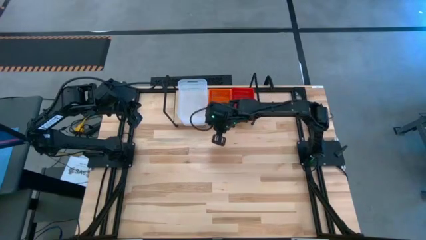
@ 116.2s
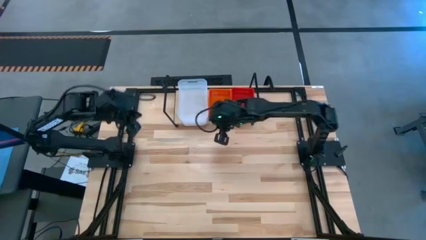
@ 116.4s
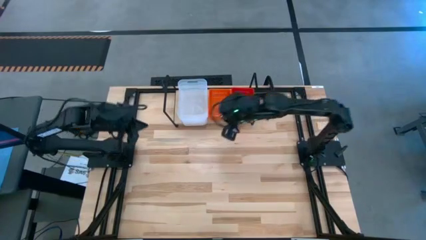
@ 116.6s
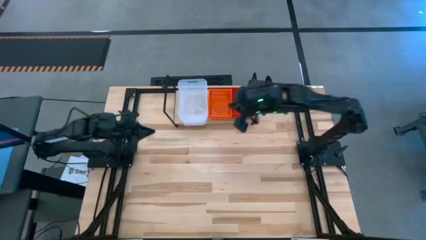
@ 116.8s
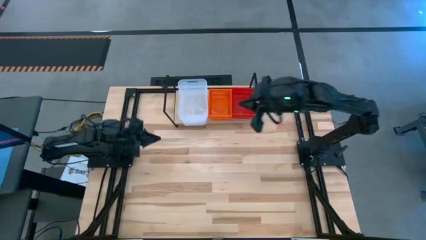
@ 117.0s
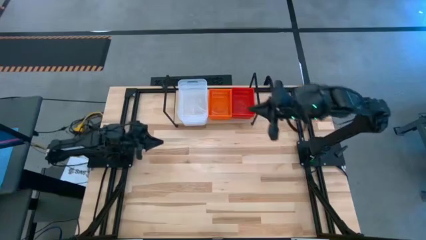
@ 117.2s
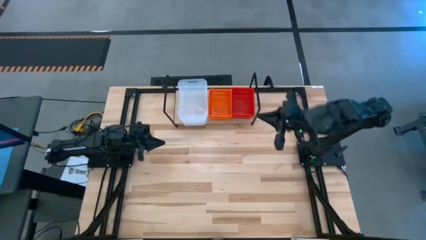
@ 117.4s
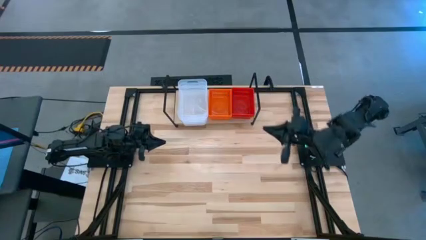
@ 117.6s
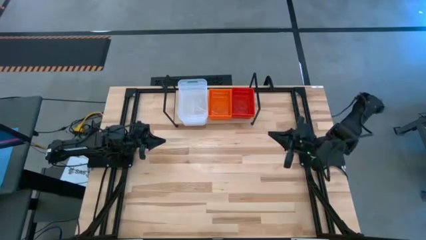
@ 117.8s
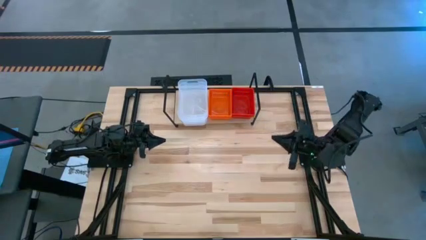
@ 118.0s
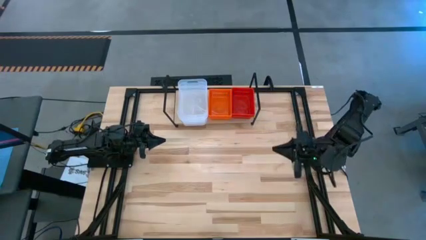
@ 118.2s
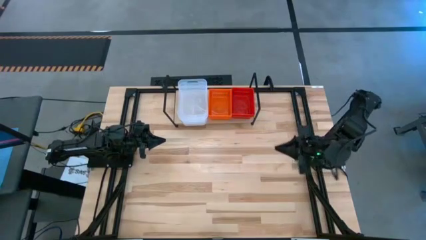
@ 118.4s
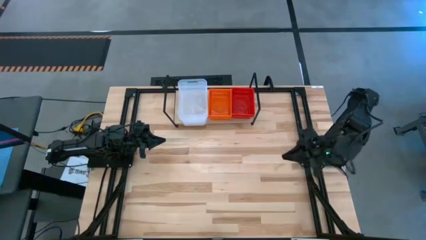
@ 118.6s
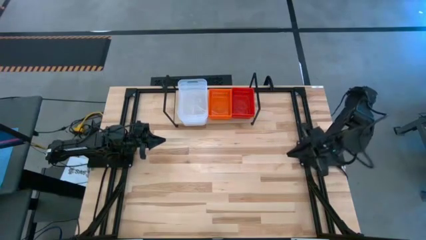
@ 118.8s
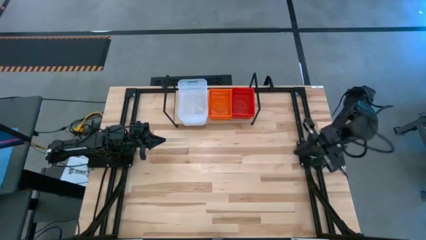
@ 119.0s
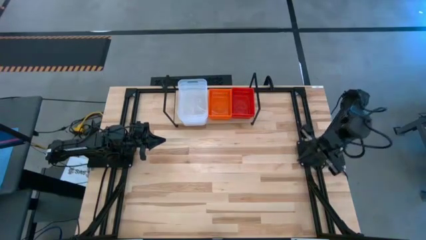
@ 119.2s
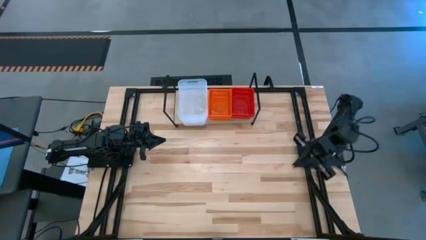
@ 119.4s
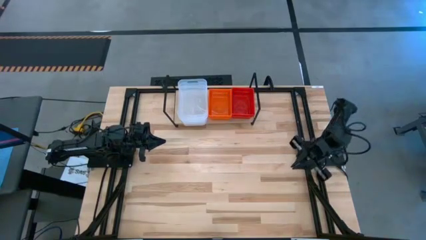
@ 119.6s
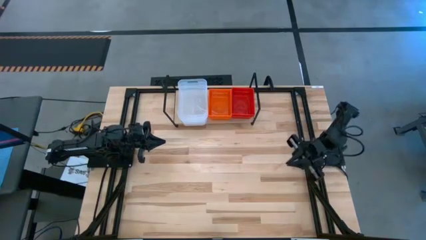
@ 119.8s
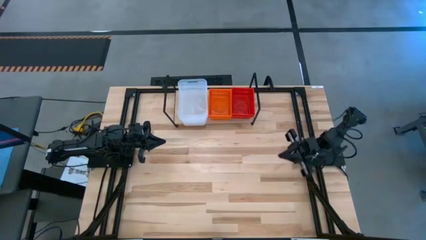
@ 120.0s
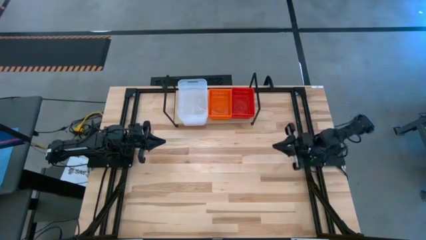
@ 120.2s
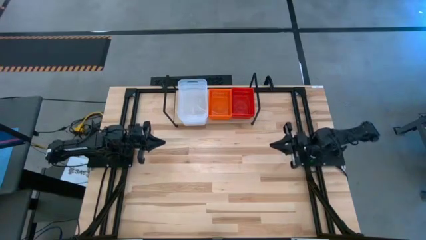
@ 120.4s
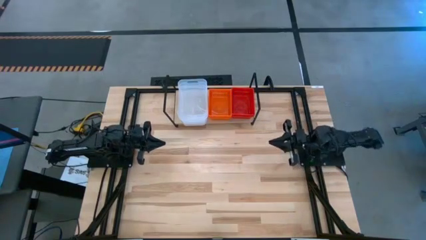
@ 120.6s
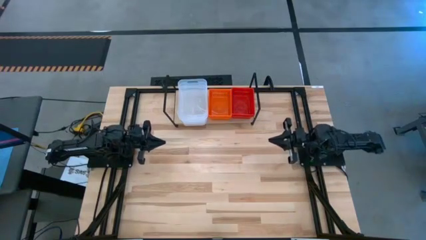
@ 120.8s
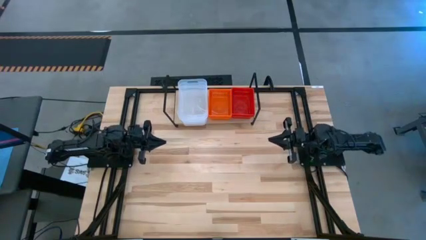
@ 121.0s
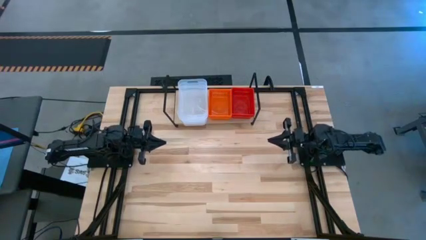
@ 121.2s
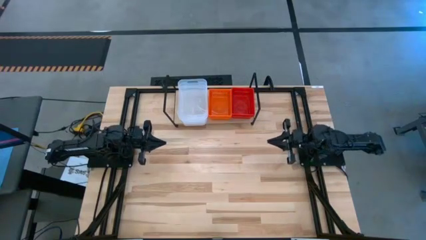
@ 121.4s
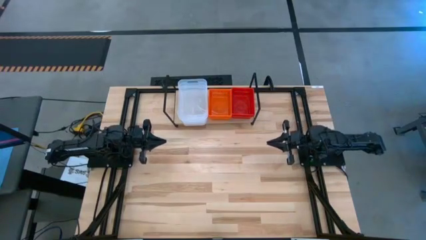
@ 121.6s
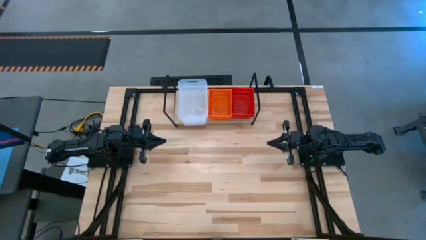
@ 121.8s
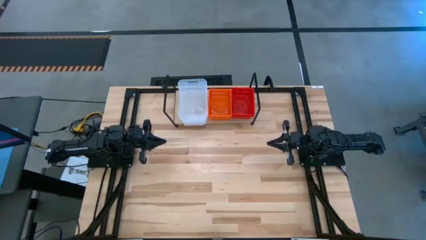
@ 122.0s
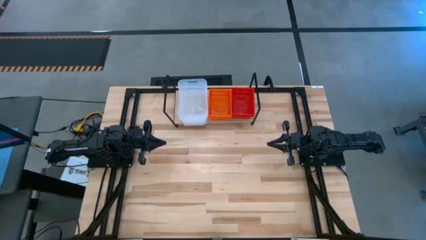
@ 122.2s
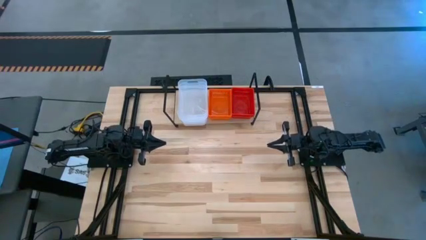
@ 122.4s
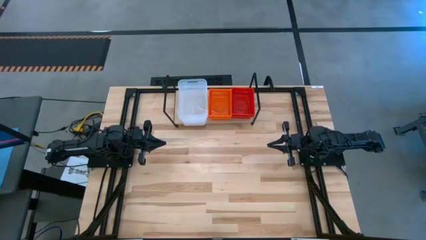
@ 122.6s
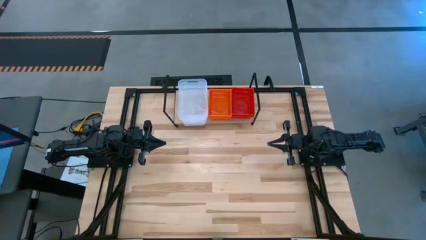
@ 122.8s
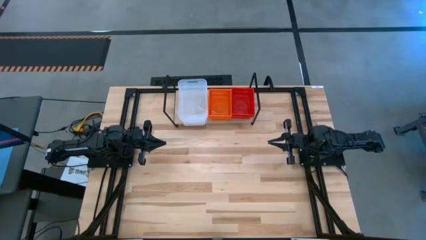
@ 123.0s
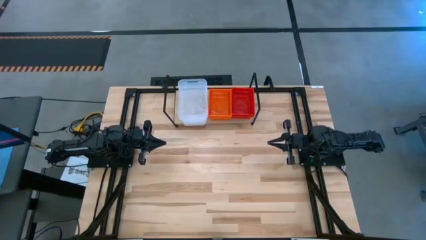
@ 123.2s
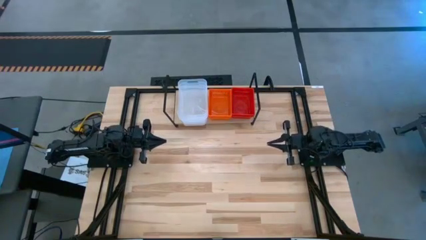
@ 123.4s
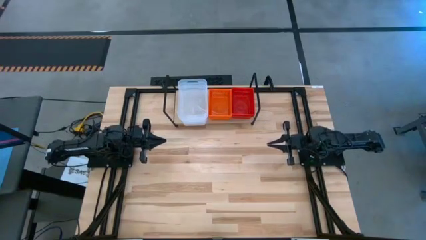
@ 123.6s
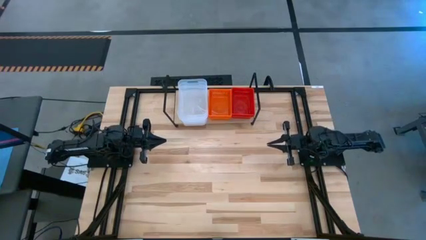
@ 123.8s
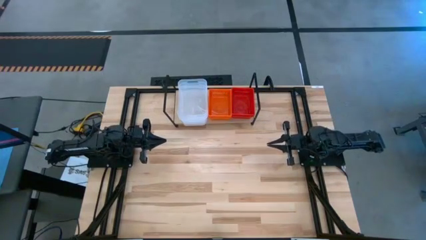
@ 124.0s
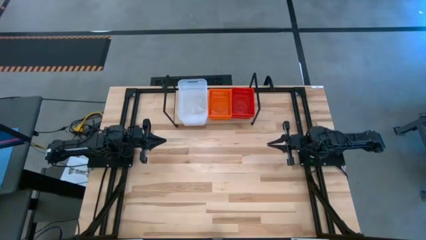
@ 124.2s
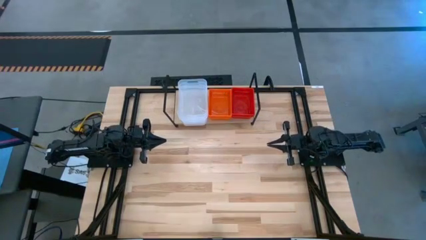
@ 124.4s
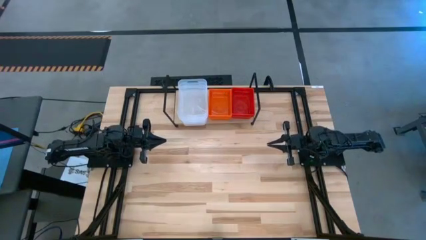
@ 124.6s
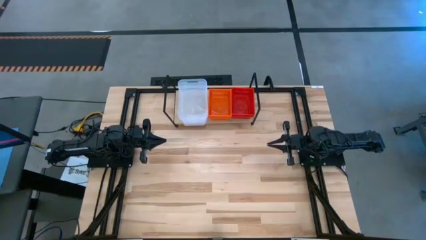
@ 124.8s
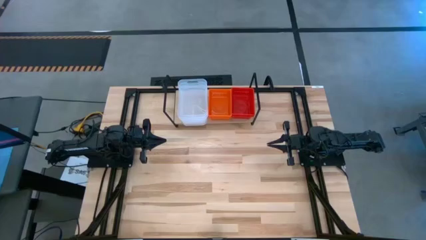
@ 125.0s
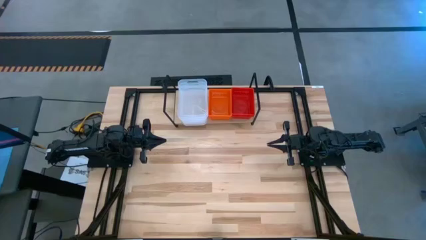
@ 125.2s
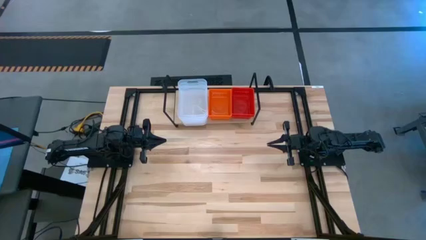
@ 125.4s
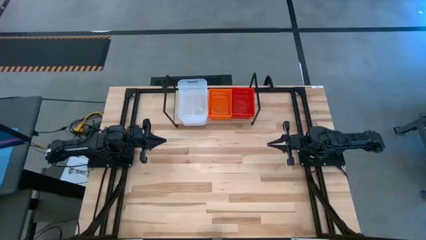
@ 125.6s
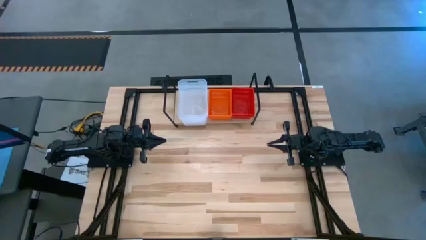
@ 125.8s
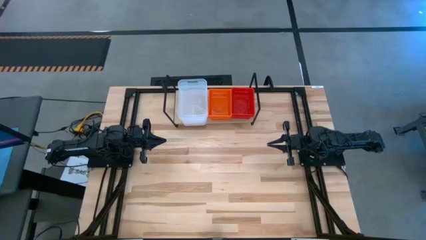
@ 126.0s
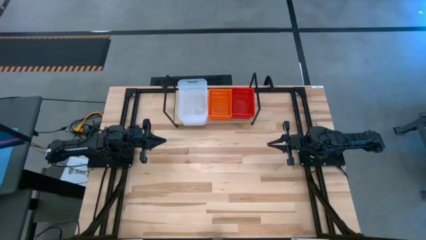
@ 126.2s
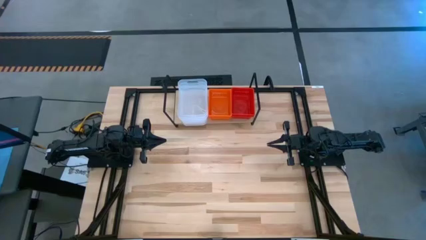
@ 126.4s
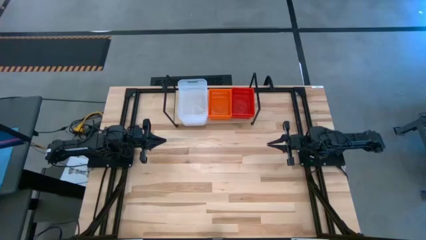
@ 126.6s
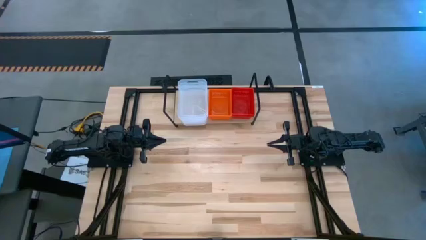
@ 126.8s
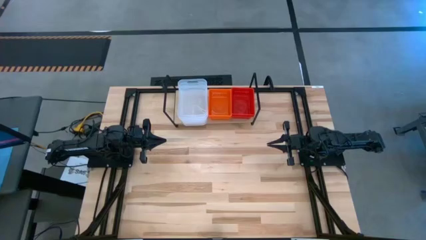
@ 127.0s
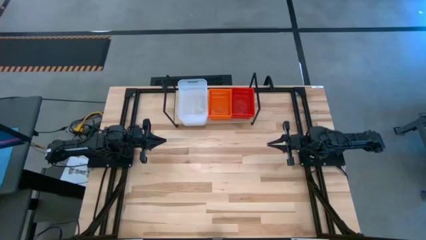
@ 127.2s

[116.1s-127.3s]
Task: Stack baskets on shelf by color
Return to Home Position

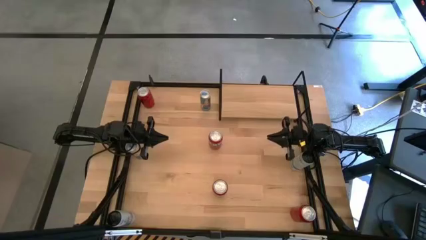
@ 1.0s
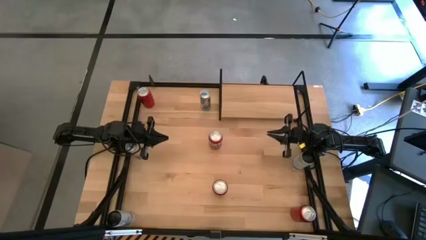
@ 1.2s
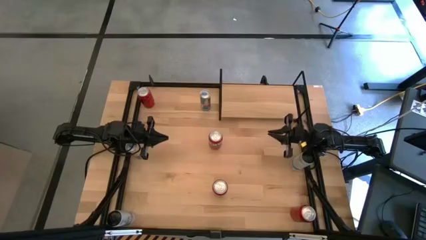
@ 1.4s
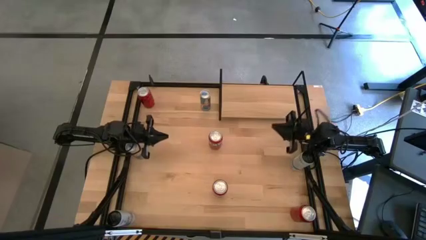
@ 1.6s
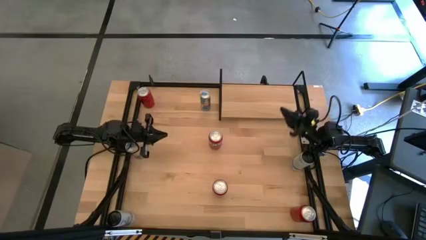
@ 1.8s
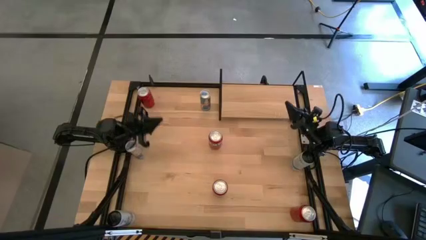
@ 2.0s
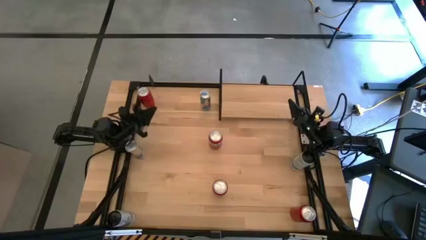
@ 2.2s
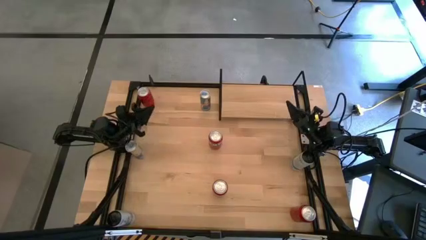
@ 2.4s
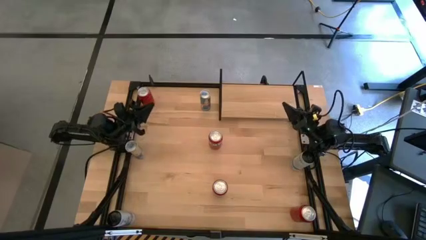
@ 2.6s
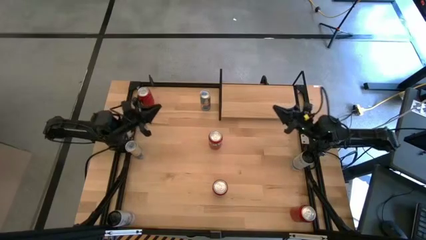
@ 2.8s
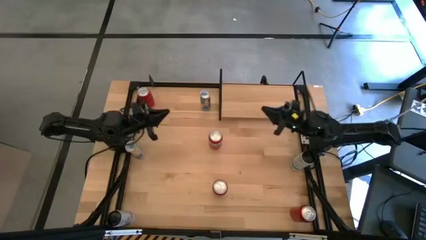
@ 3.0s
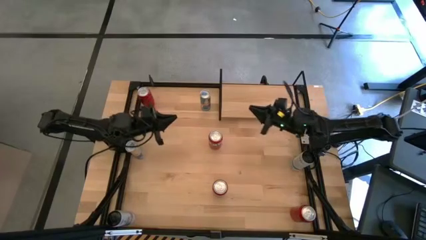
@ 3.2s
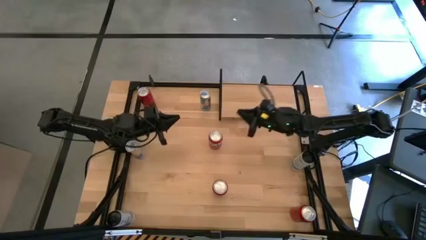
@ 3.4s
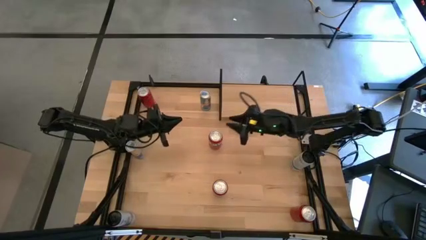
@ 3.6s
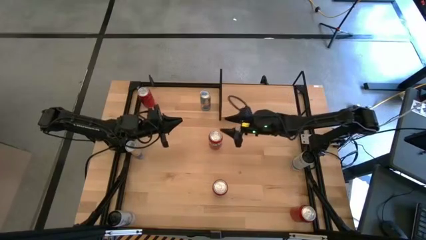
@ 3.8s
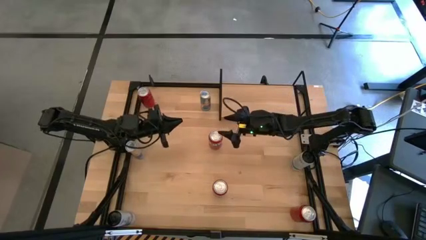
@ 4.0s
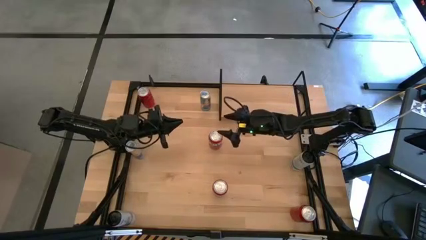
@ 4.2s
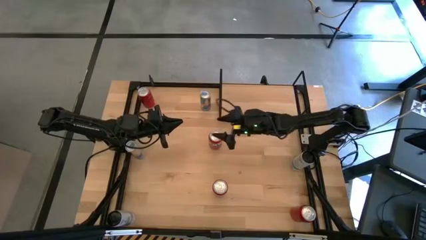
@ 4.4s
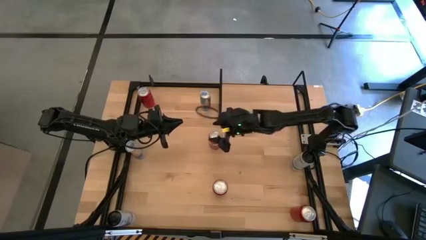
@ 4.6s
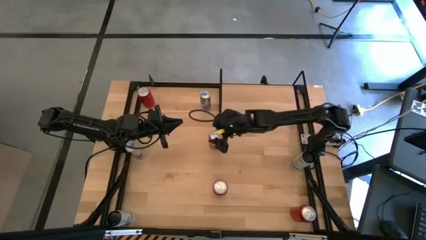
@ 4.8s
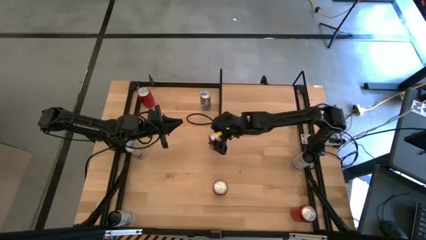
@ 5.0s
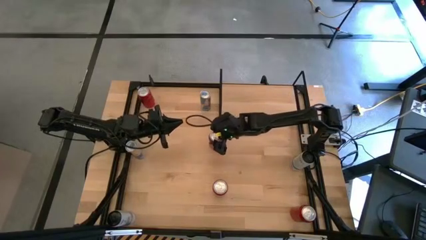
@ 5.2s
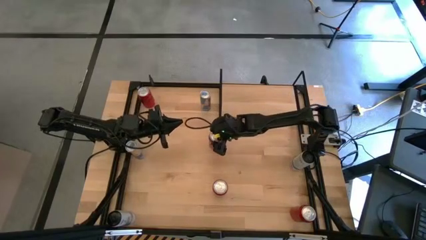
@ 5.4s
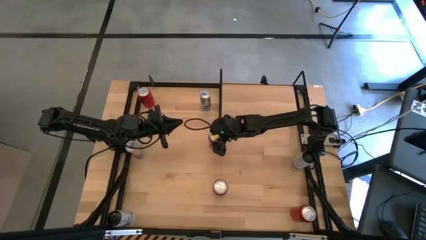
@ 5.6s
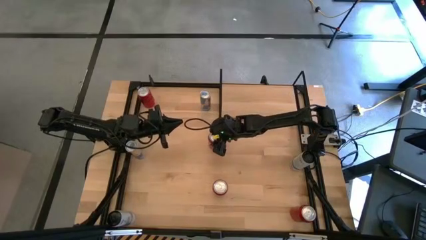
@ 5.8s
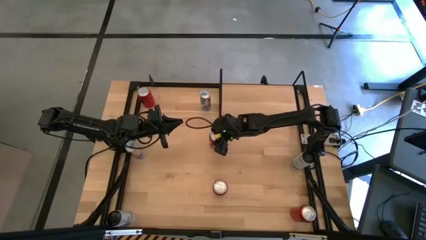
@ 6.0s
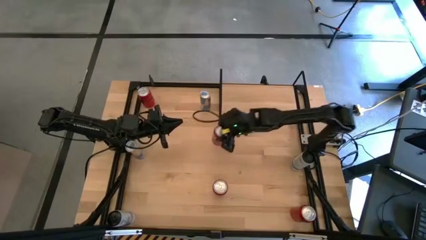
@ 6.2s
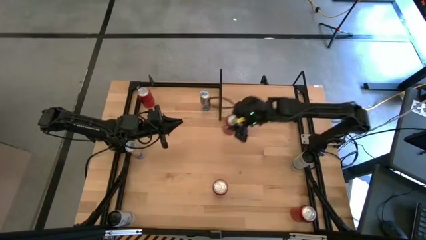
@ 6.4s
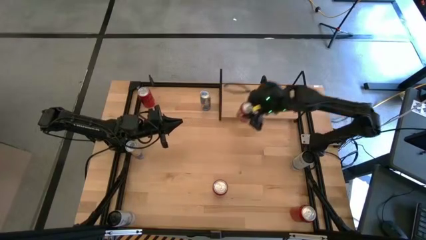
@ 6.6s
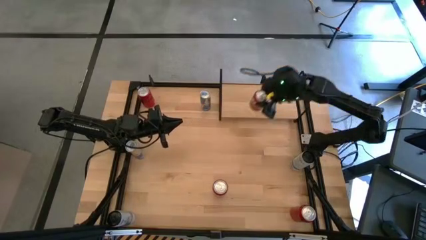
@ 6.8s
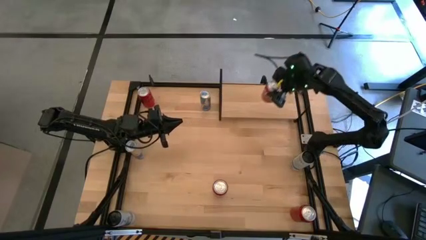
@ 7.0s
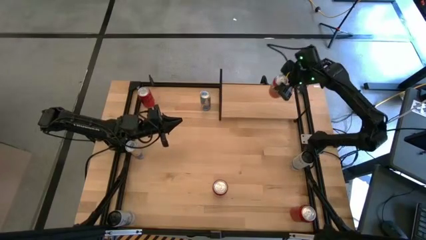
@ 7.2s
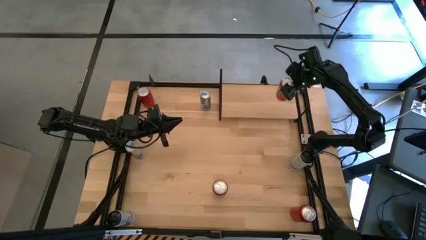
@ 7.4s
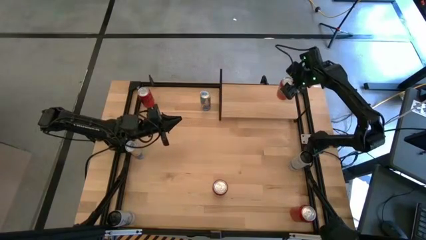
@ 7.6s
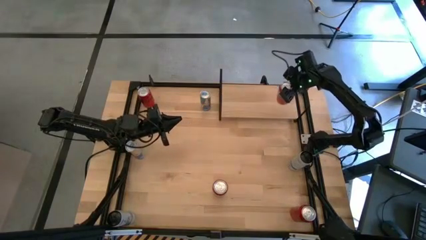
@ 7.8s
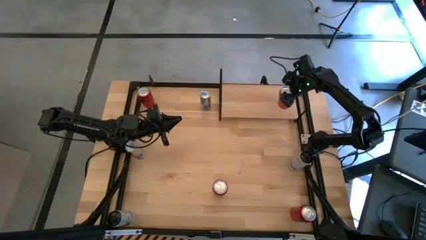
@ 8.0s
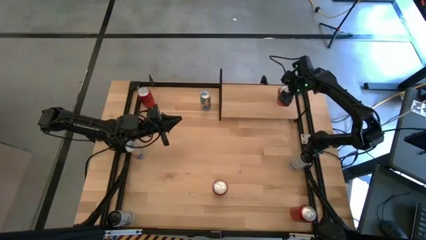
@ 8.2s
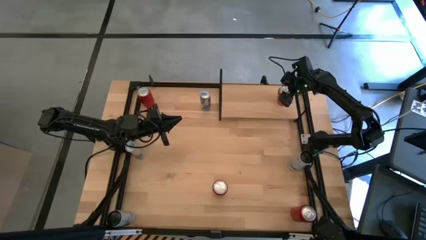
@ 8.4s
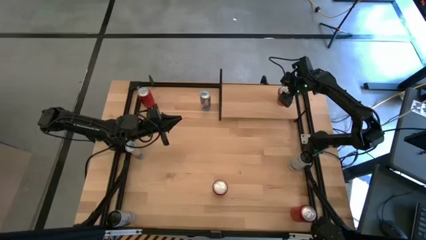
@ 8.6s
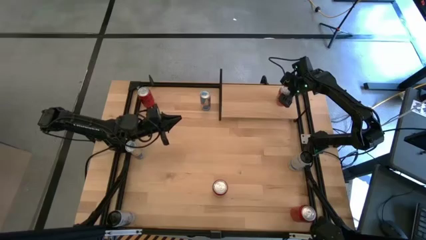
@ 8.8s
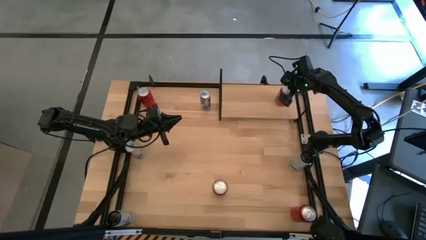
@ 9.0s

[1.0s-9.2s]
Task: Place canned beverage on shelf
Put the top orange soda can on the shelf
